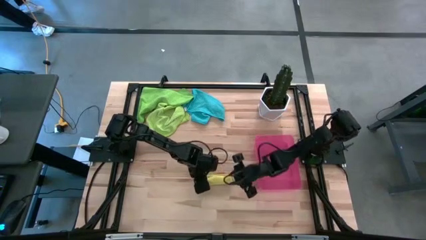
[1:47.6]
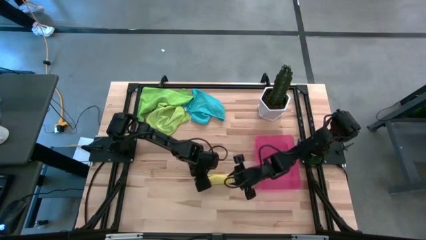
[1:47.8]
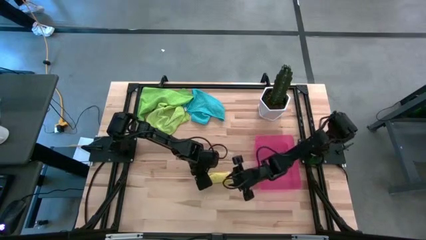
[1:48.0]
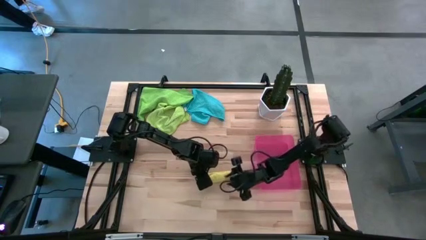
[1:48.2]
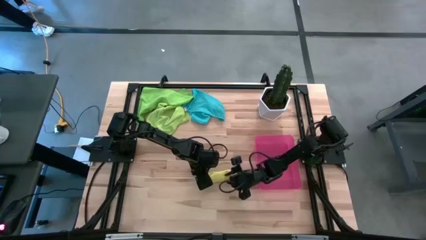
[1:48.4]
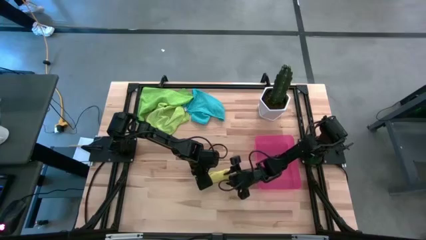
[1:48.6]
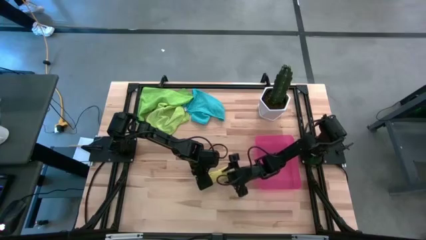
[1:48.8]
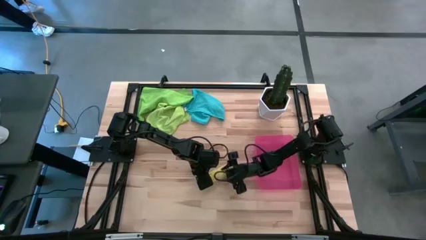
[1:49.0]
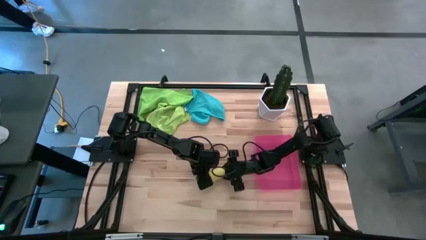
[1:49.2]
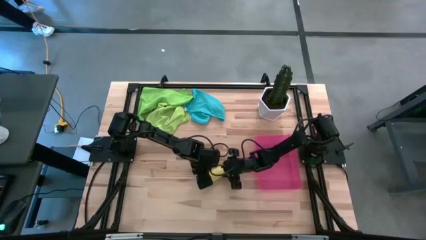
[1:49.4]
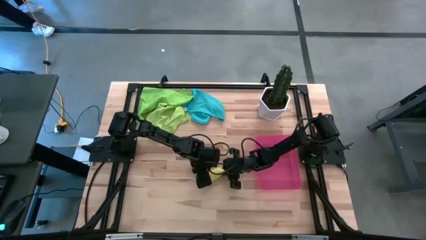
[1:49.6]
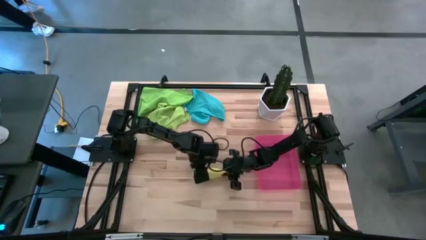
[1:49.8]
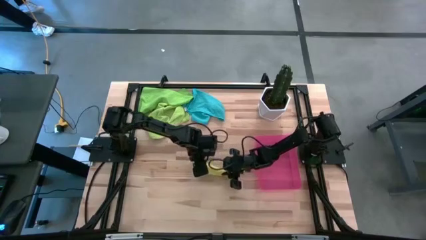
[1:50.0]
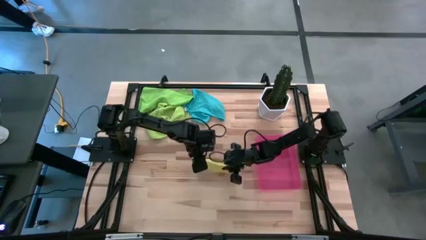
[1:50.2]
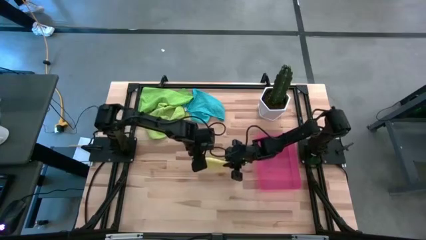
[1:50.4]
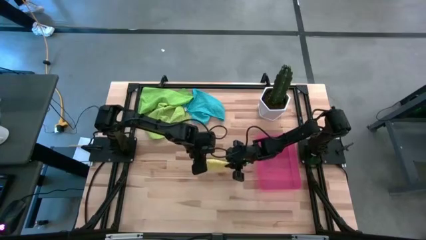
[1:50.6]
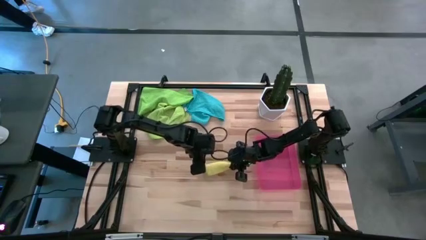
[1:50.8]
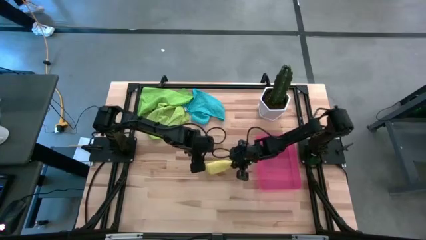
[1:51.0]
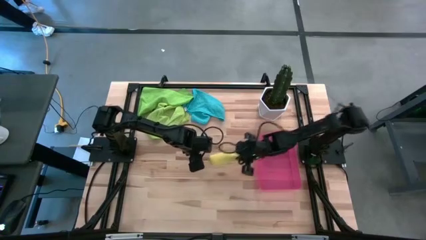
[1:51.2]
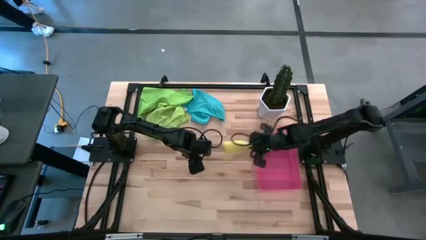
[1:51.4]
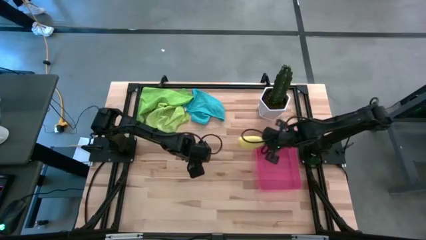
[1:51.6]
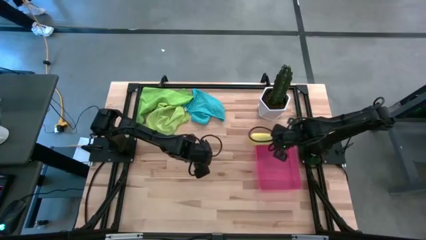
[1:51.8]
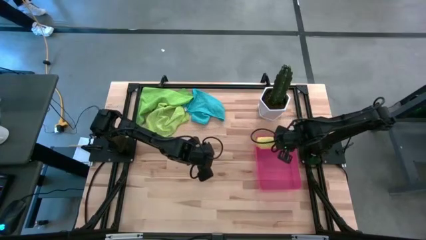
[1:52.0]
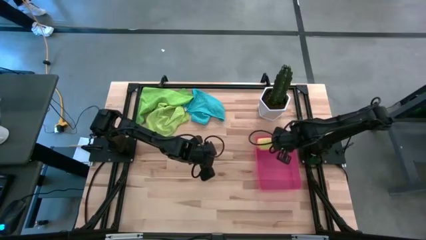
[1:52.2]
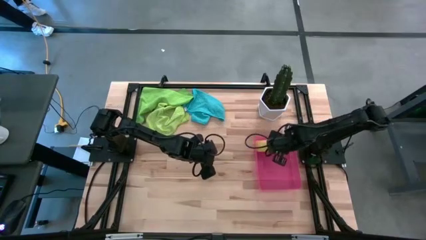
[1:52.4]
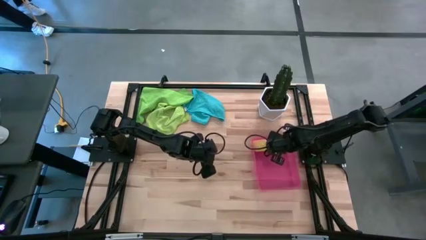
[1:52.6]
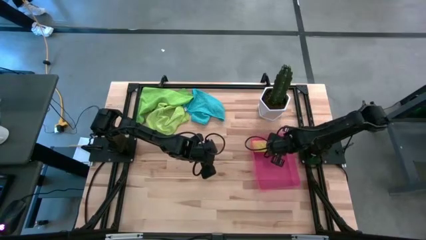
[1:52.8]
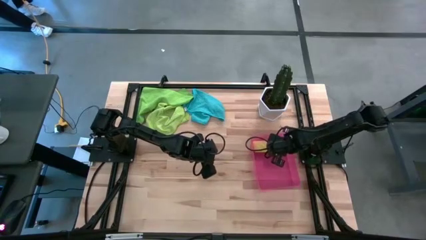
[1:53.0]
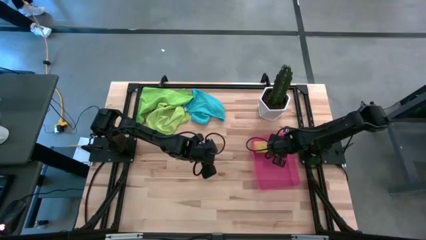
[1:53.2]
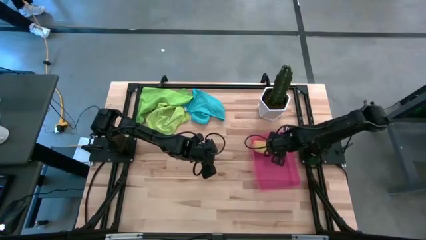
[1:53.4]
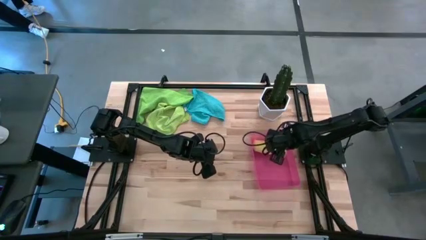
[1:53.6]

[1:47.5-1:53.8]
Task: Roll microfiber towels into tight, uniform cylinder then place into a basket
Put the yellow microfiber towel into the pink bin

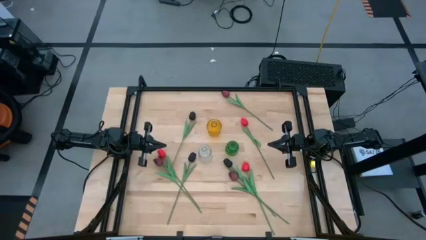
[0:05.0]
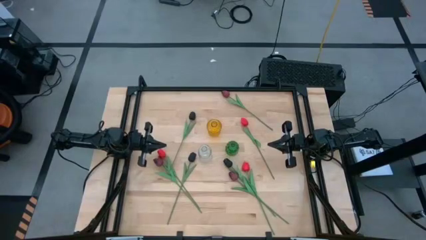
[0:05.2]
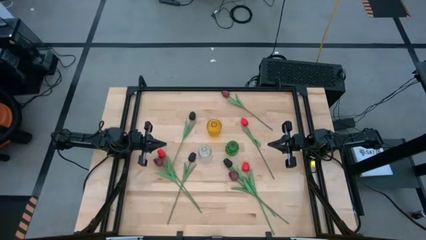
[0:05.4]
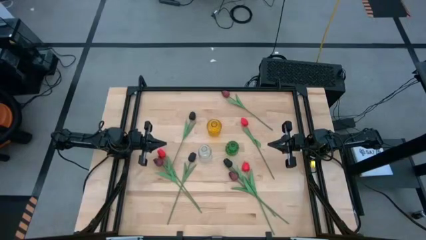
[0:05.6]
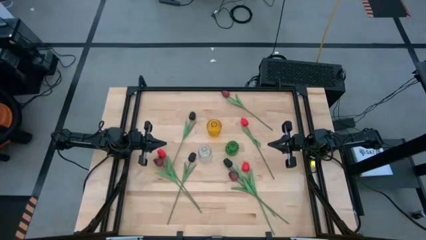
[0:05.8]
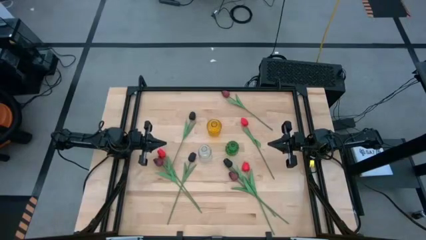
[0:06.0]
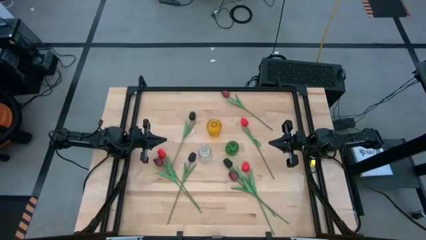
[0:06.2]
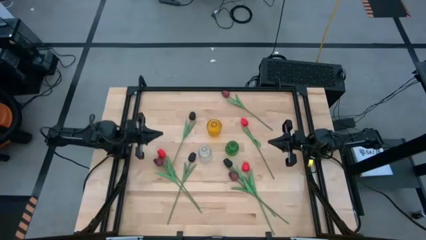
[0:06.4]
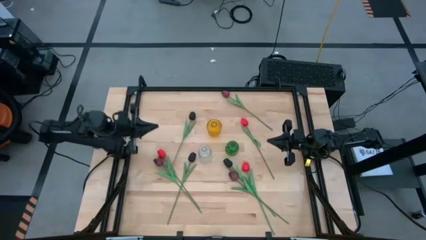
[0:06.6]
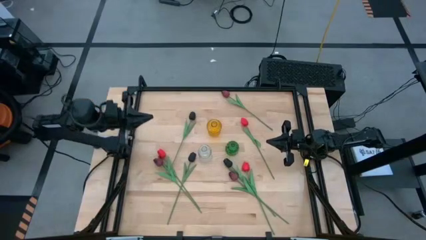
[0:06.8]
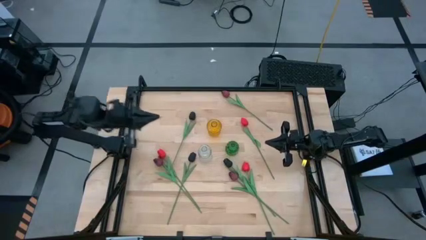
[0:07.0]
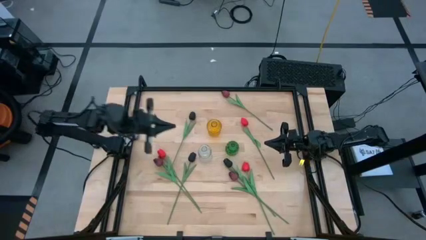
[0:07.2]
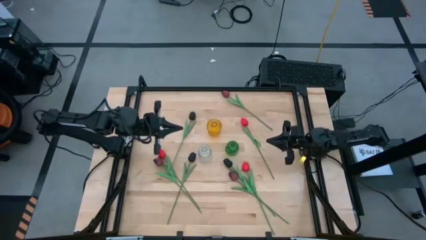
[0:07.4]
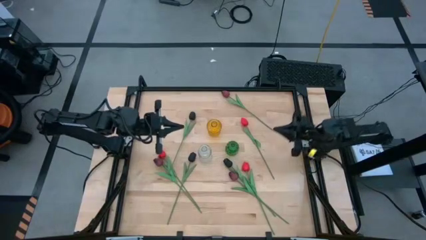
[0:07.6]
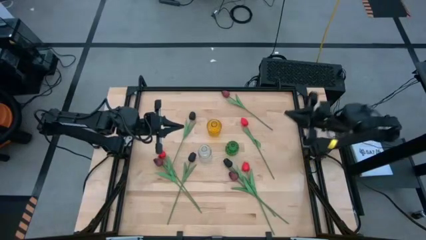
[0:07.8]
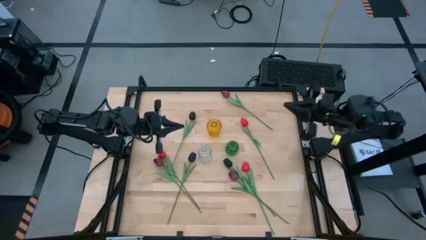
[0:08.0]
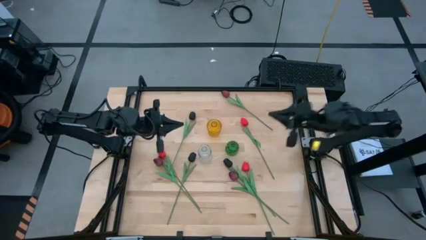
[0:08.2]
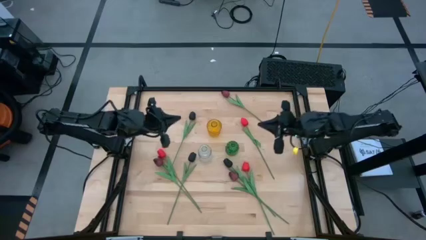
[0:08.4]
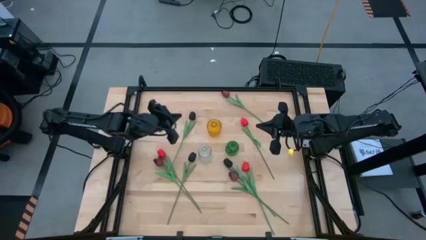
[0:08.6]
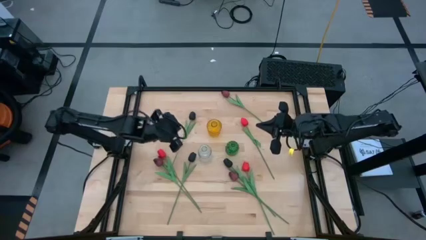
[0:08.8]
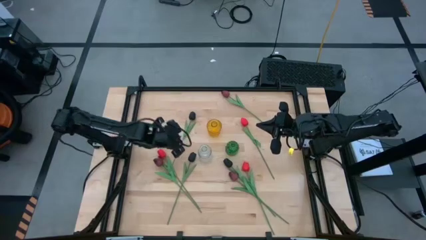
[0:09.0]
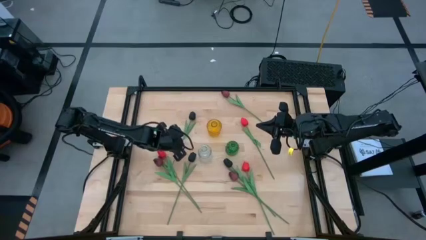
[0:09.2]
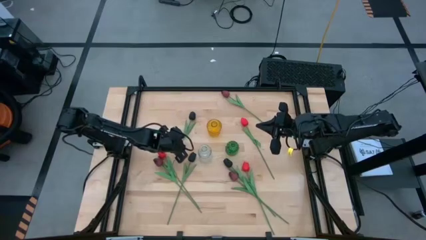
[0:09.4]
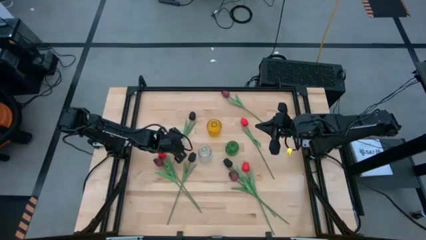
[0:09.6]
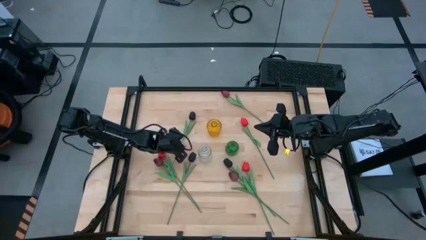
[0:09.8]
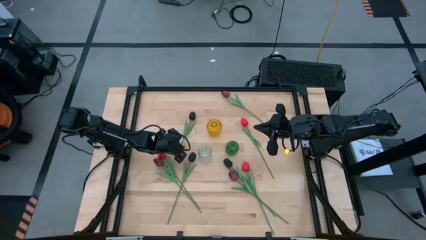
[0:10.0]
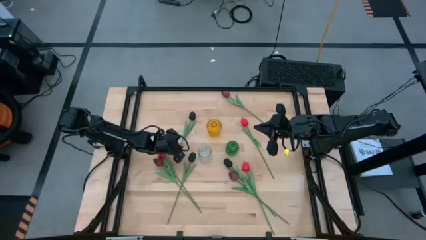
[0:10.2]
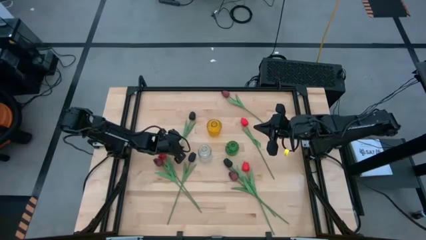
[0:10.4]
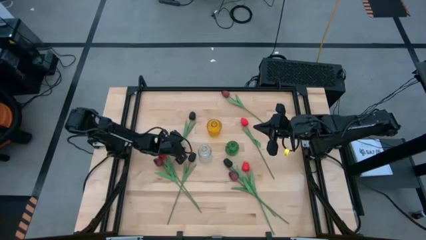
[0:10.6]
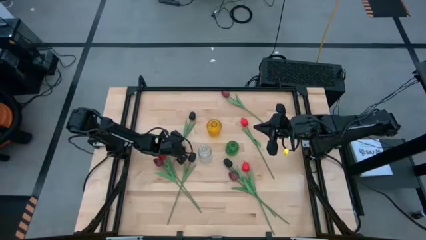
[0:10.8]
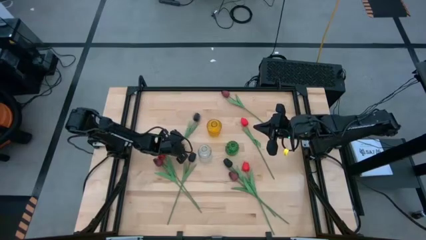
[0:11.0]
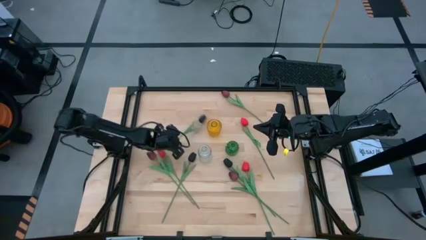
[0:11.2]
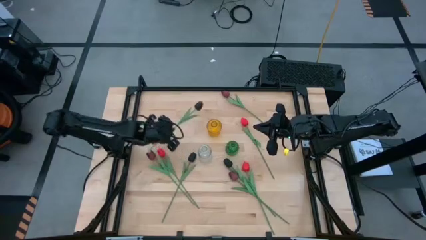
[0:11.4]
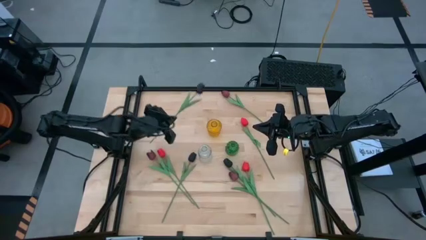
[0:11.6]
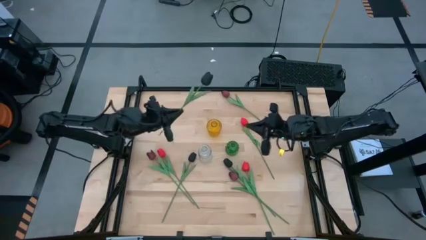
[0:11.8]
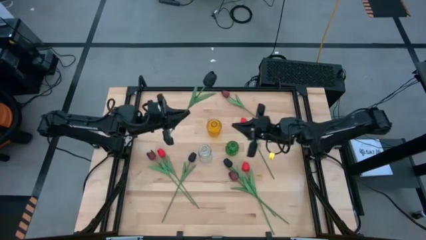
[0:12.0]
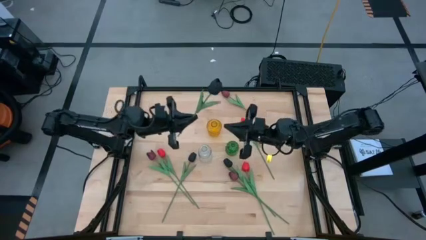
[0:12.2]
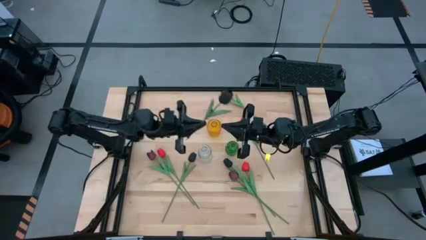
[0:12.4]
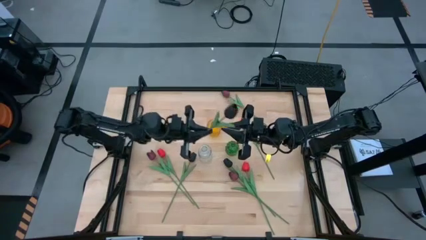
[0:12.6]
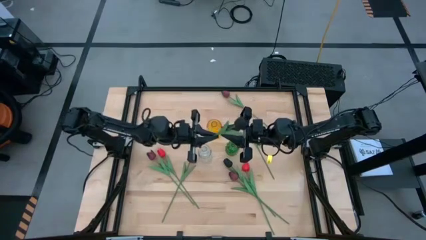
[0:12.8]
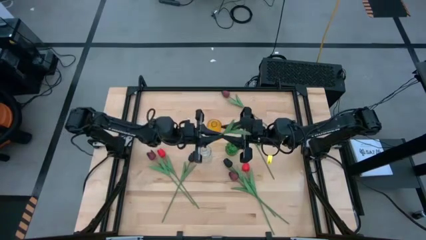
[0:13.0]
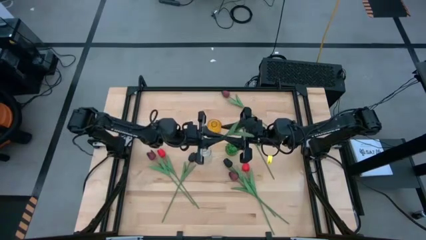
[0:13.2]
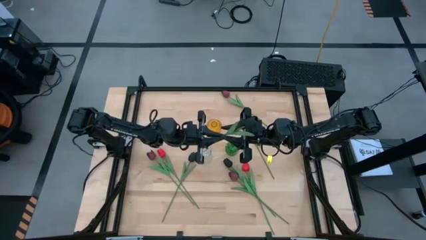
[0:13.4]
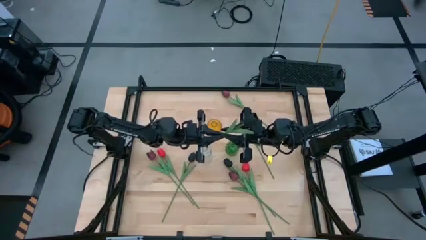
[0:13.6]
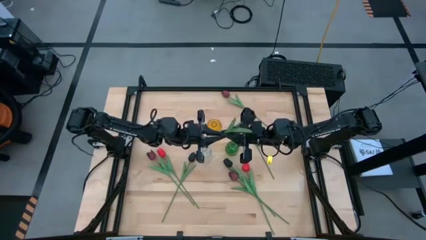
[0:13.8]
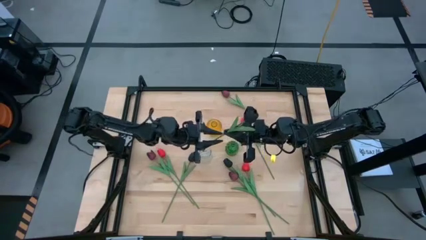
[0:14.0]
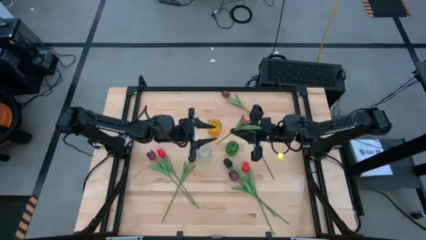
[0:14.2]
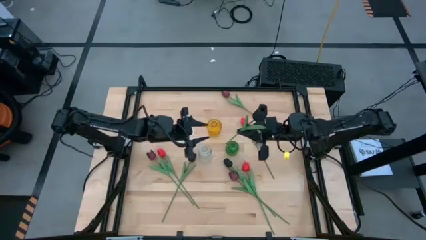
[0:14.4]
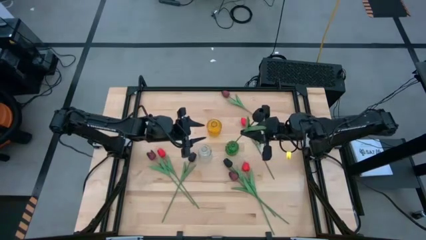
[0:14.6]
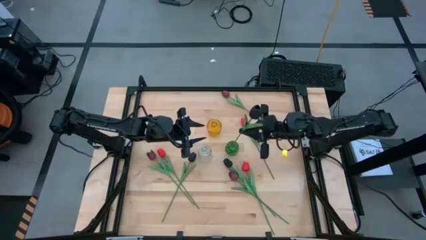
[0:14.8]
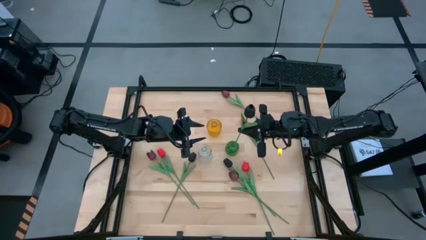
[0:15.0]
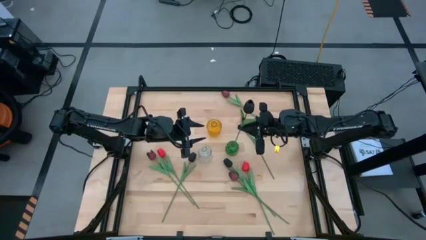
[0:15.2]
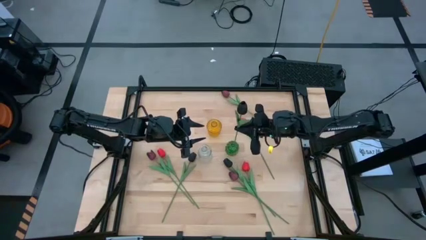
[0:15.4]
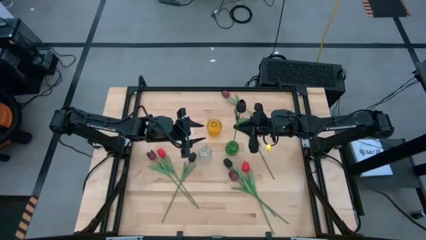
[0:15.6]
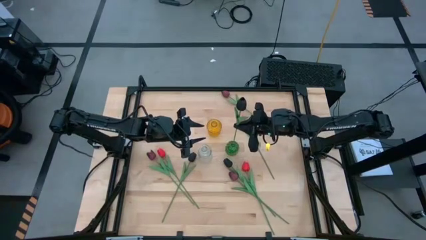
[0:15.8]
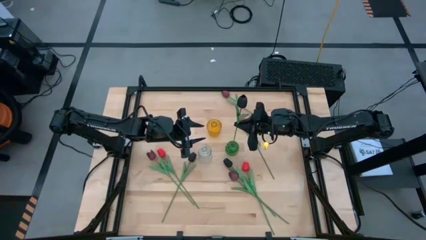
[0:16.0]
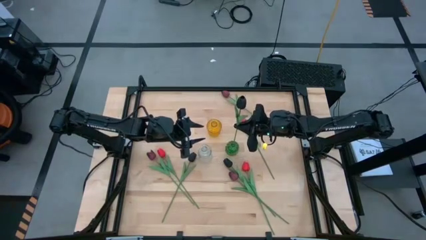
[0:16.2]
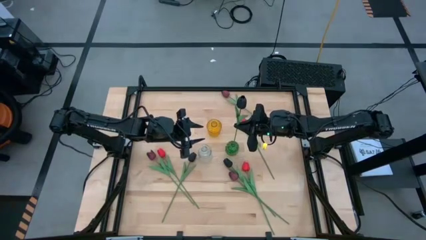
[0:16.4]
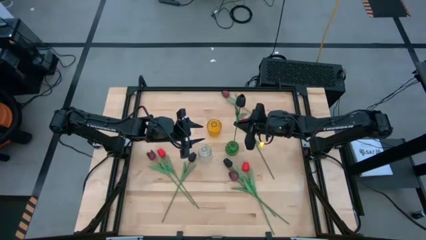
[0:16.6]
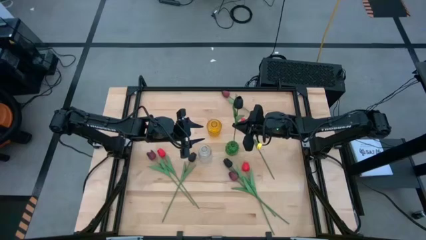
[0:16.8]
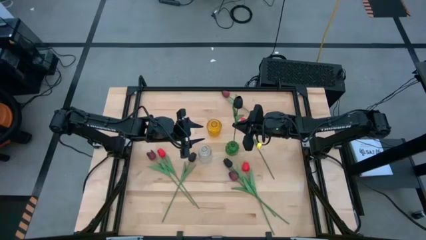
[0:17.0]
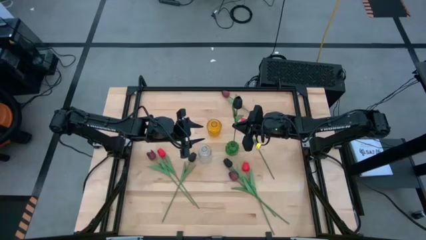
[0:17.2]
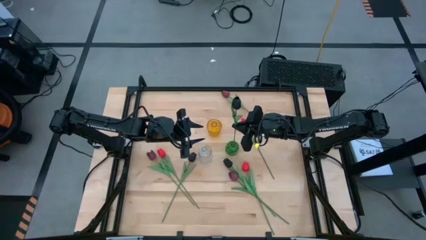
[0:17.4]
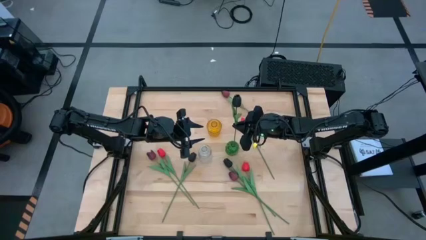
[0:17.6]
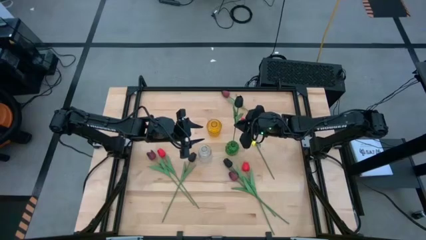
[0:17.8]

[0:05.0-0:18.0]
Task: Sort flowers into vase by color
Put the top left black flower in the green flower vase
